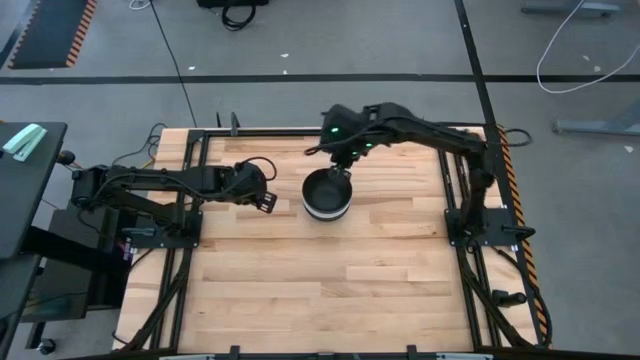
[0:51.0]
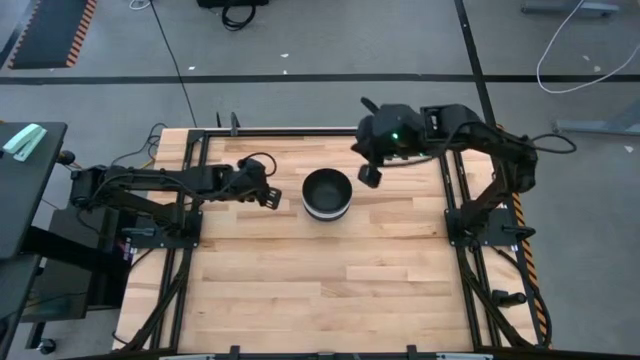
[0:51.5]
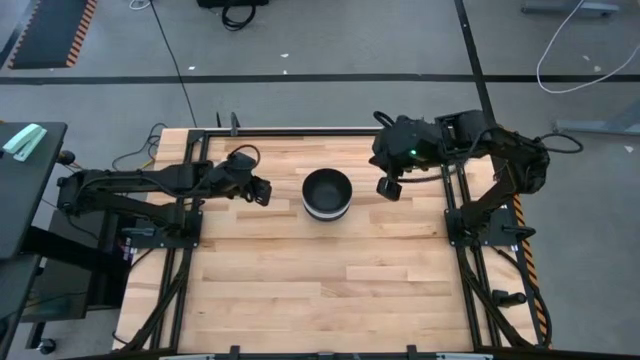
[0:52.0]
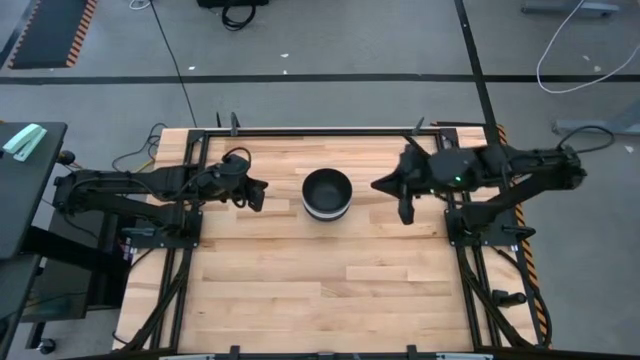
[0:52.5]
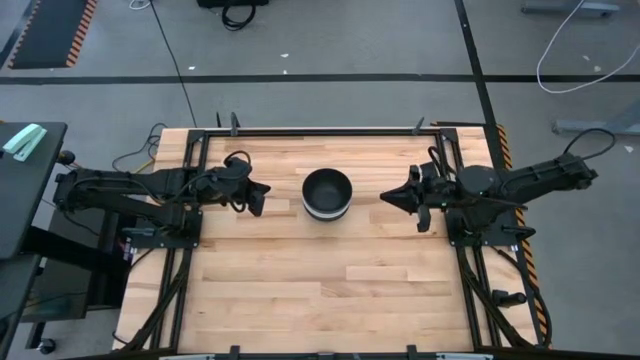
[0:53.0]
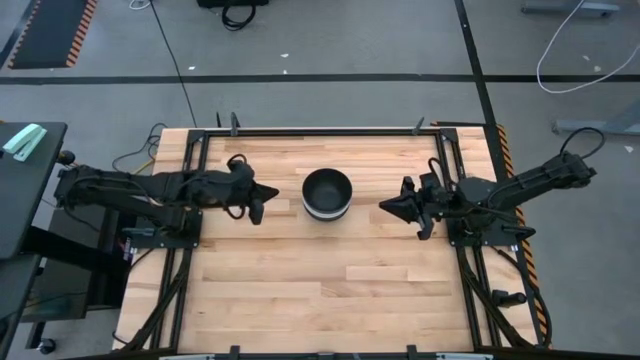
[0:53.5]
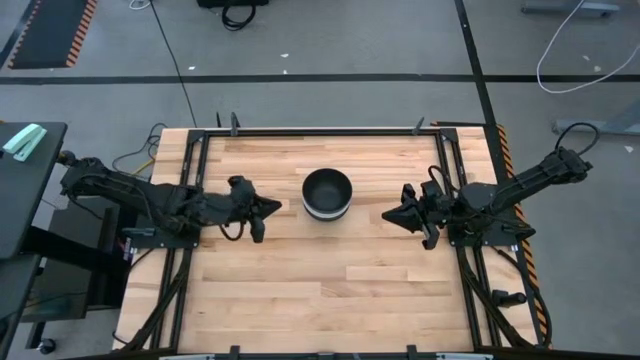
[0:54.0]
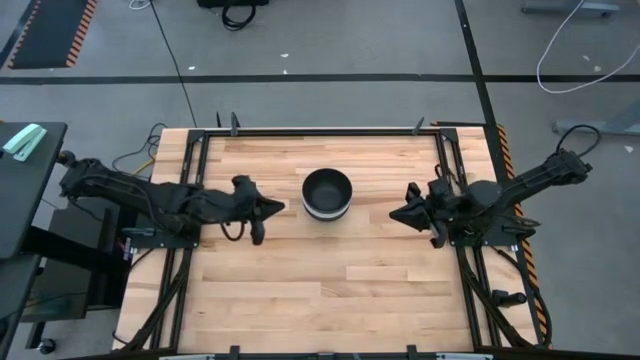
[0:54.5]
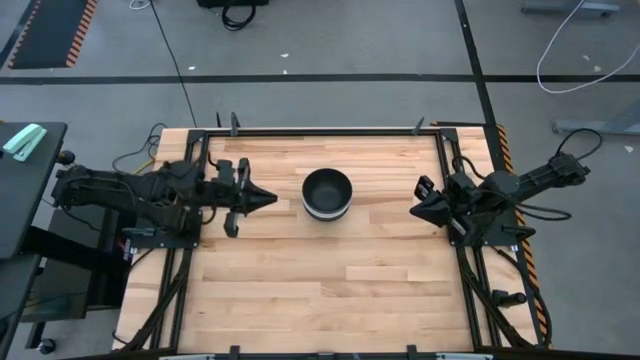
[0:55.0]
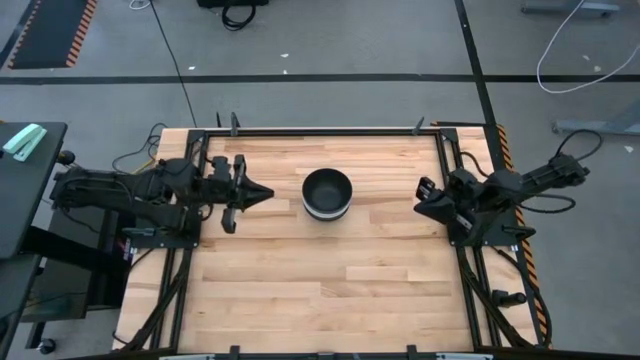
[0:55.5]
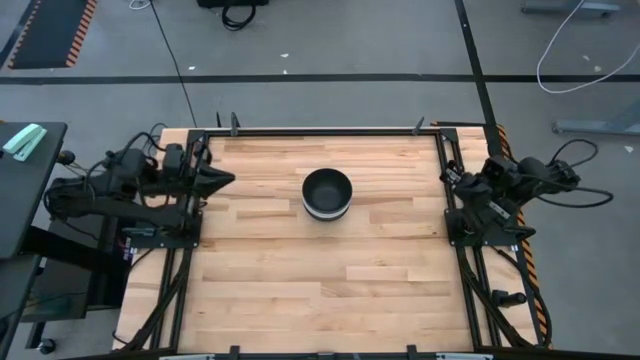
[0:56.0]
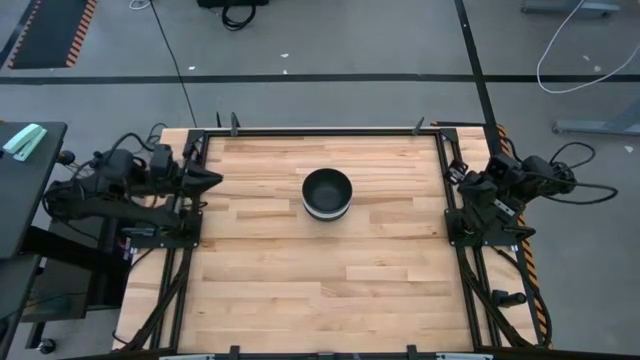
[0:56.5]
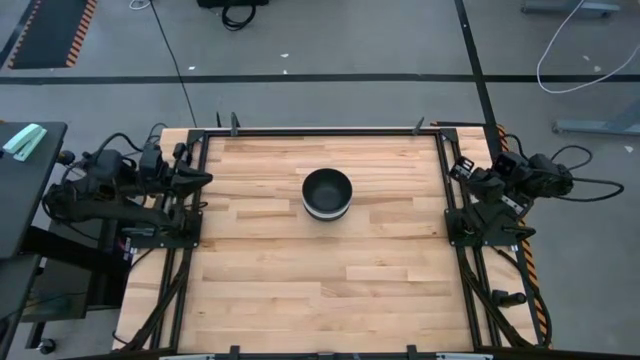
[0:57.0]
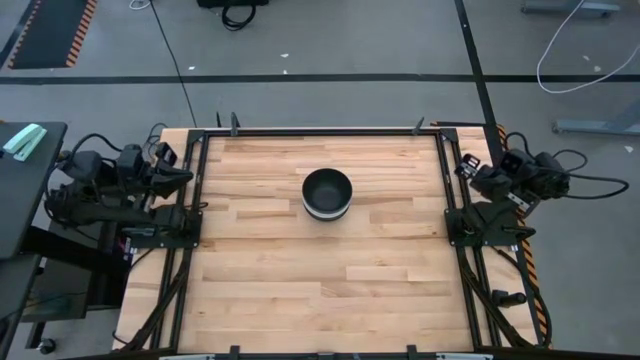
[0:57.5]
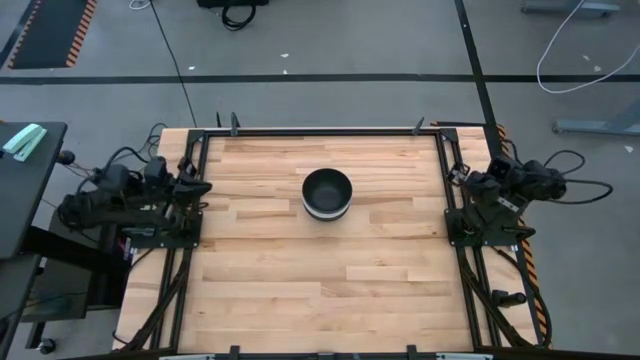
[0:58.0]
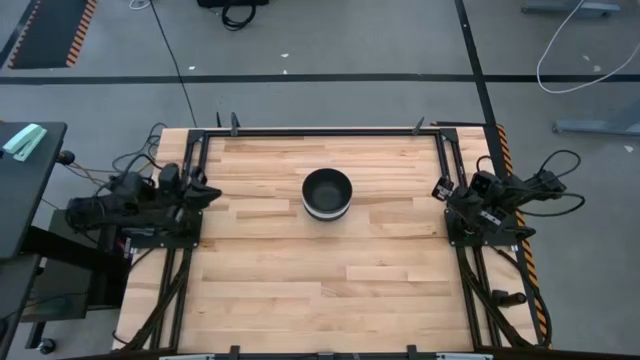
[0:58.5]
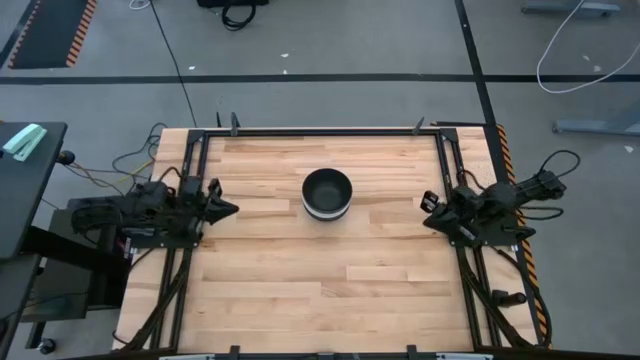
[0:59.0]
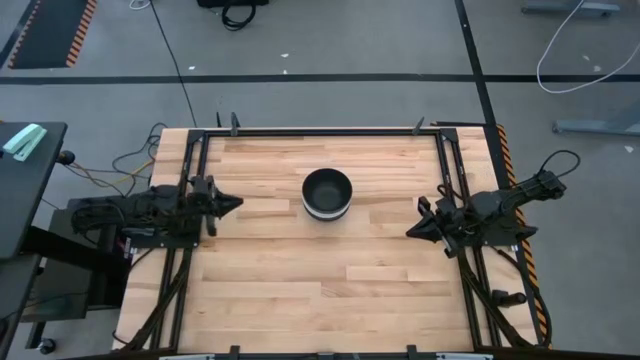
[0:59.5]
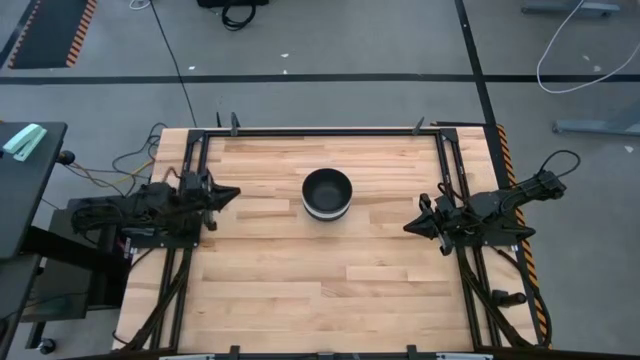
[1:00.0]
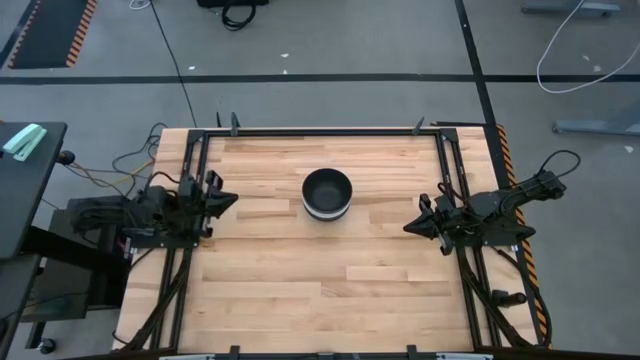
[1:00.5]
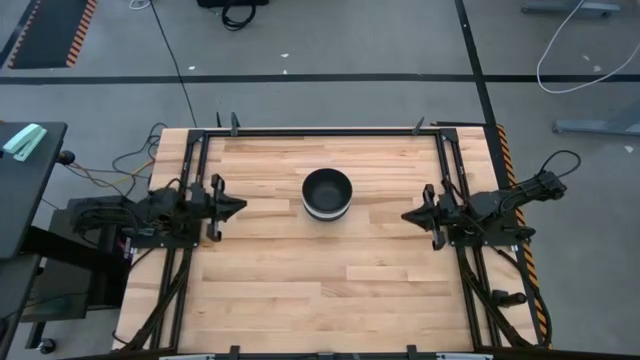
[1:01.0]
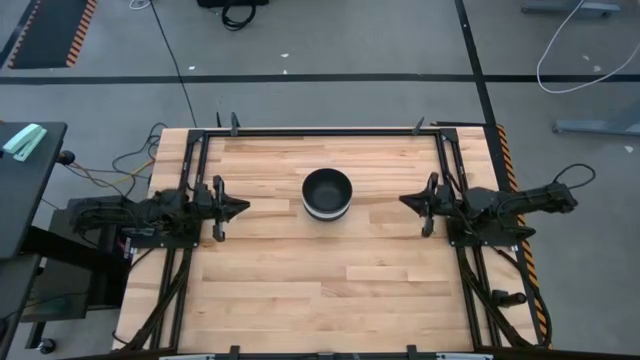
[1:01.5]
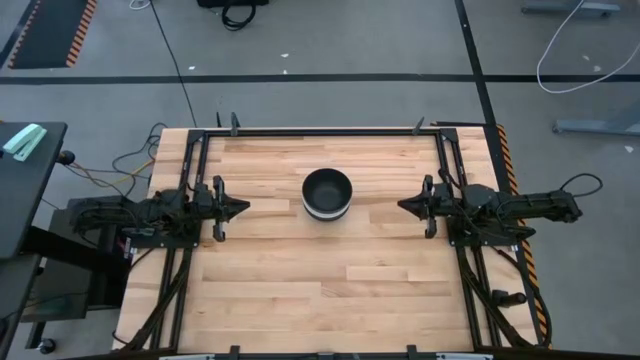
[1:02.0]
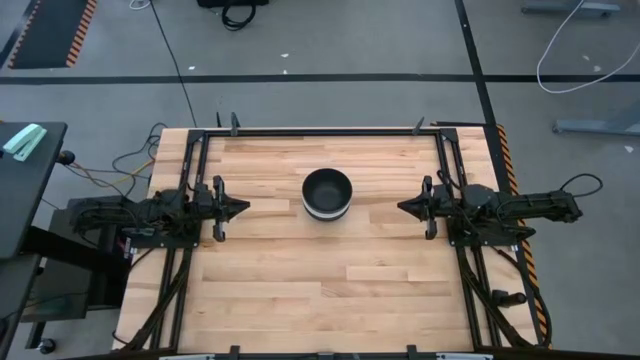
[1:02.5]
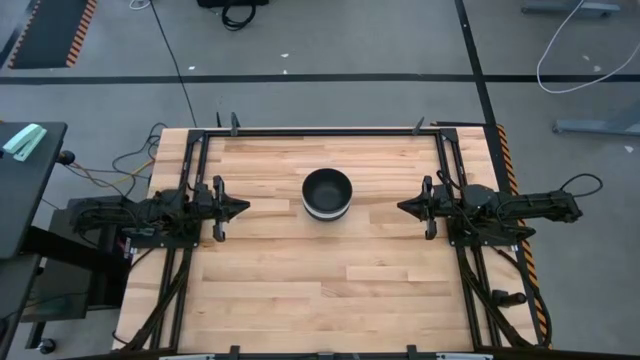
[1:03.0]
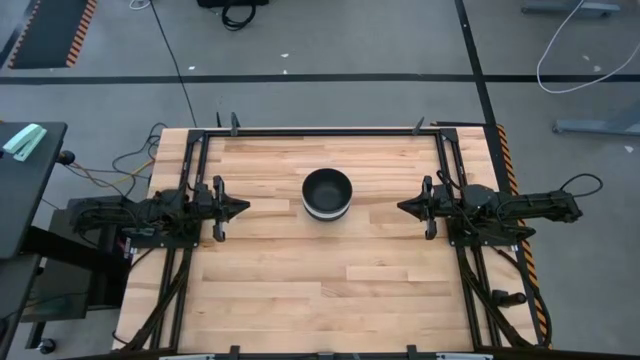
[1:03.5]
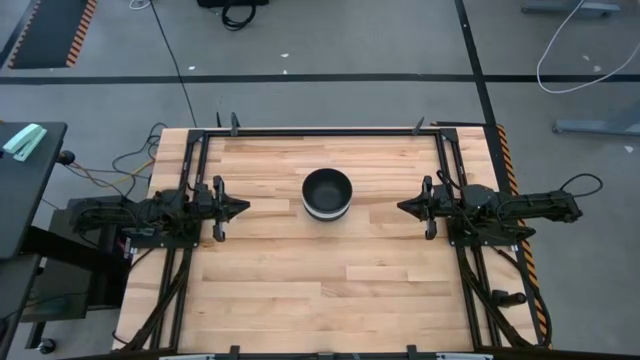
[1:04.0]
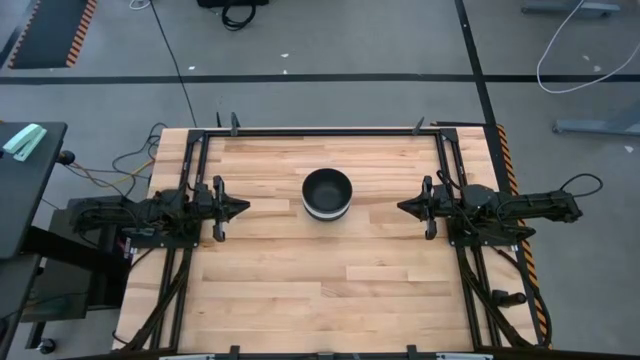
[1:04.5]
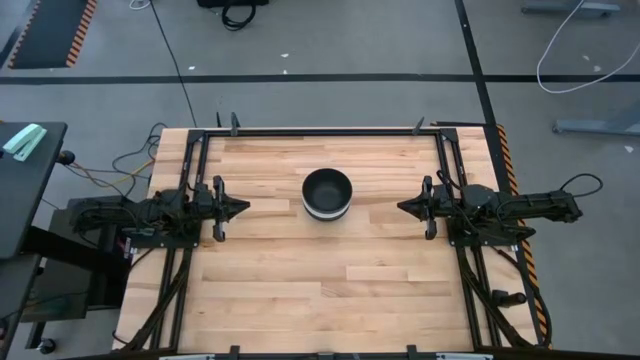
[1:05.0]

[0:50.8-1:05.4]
Task: Nest bowls inside each other
Return to Home Position

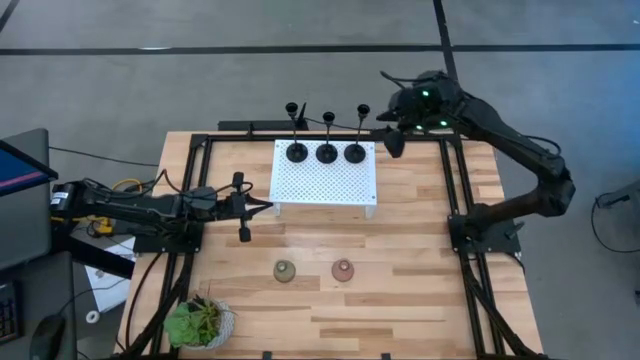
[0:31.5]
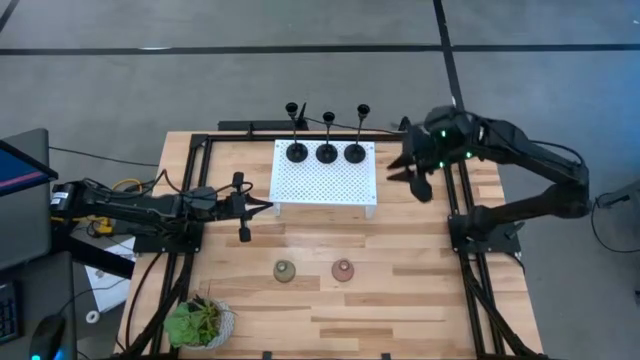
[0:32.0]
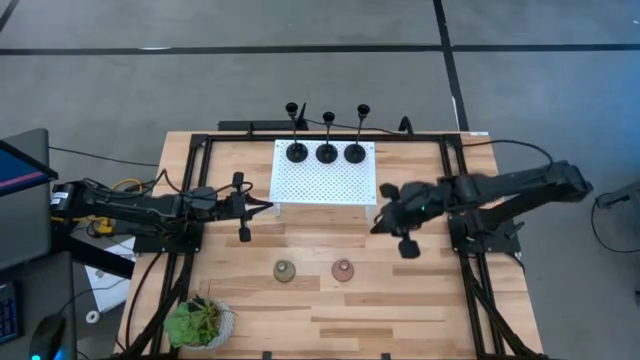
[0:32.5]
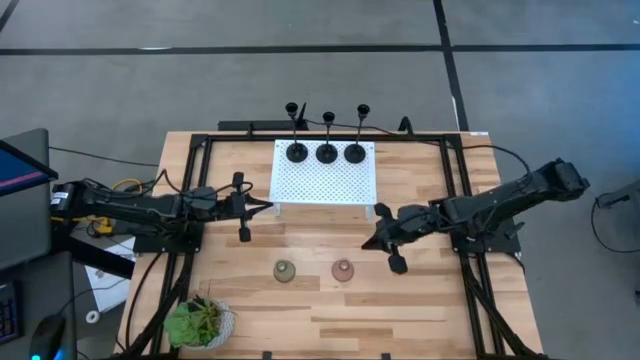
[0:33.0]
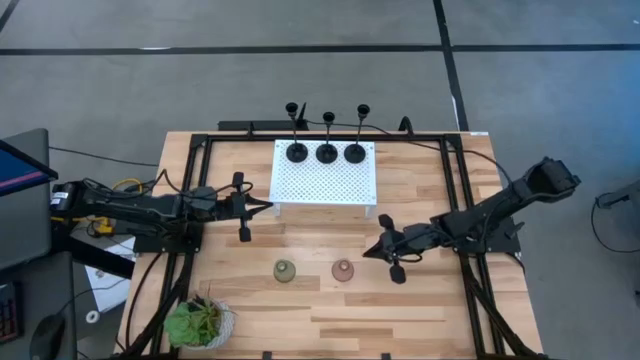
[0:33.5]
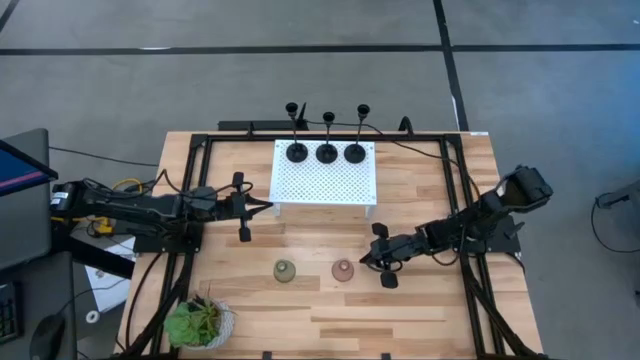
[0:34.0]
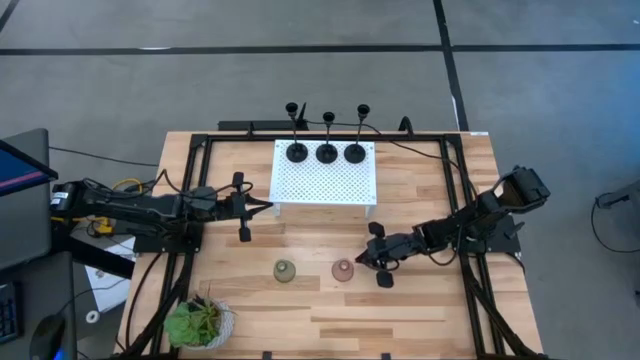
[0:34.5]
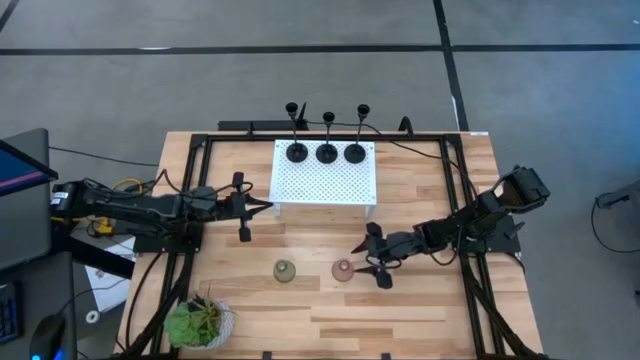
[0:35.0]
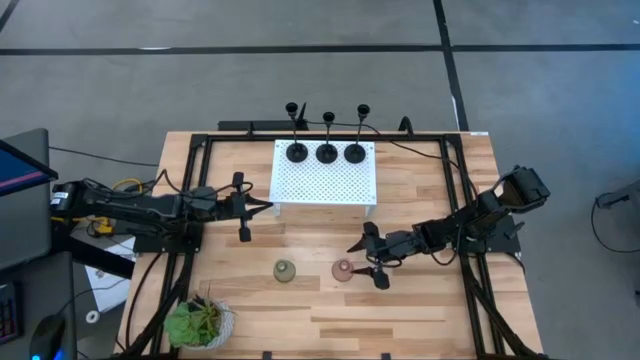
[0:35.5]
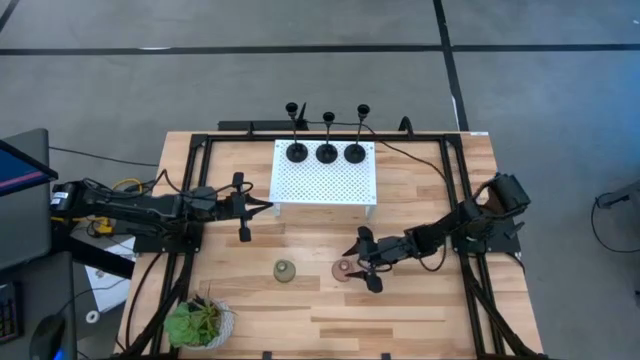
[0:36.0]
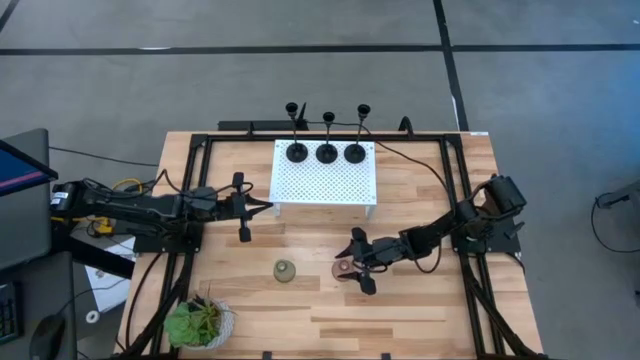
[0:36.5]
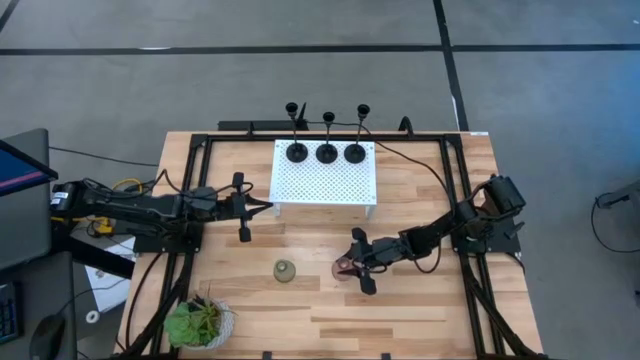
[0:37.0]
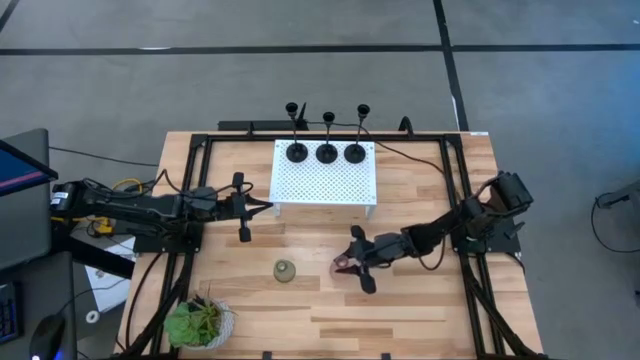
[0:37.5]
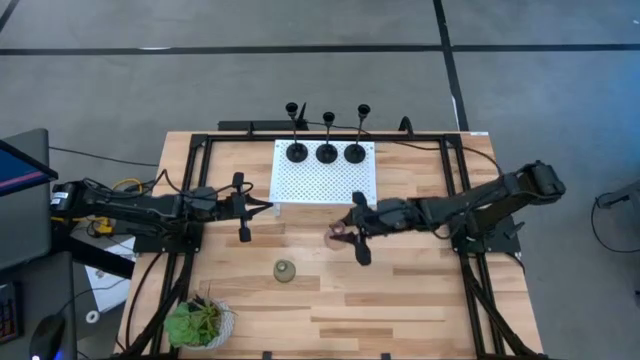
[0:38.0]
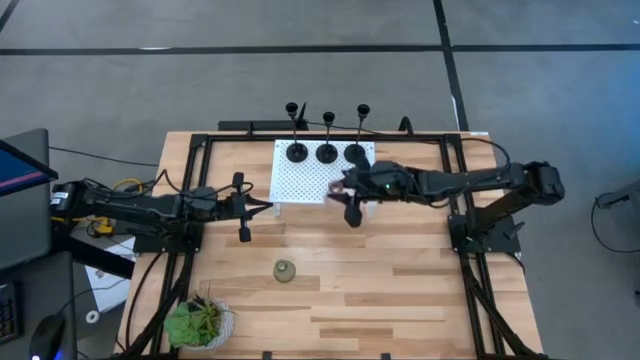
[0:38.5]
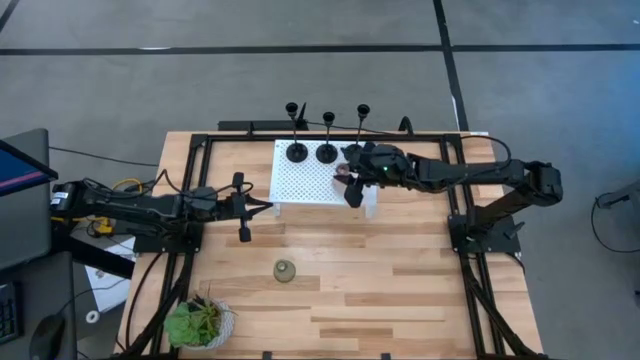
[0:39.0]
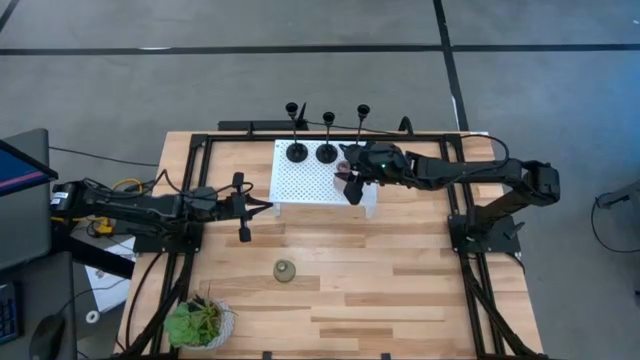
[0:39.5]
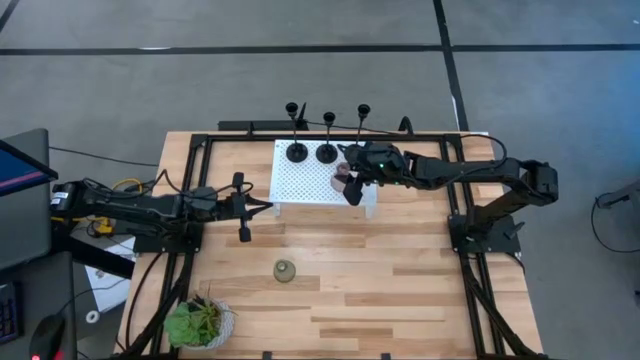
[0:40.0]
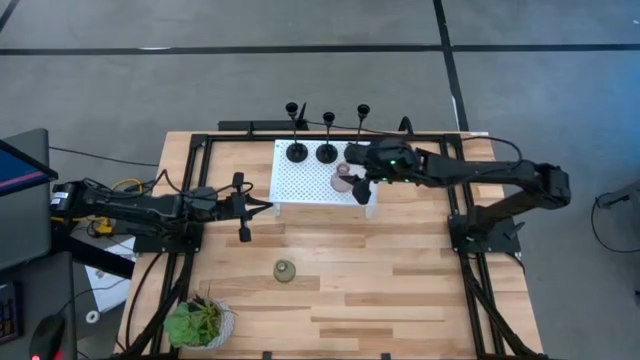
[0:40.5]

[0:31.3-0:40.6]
Task: Pick & Place candle stick holders
Put the pink glass candle holder on the shelf
